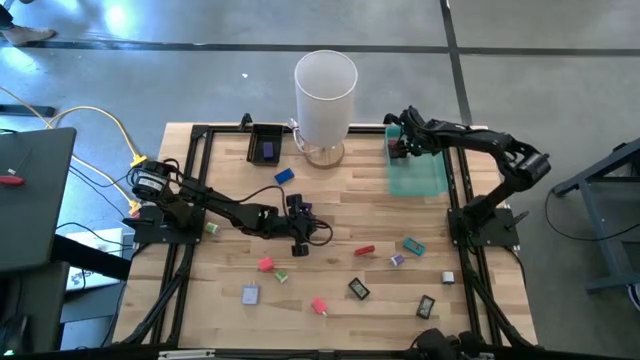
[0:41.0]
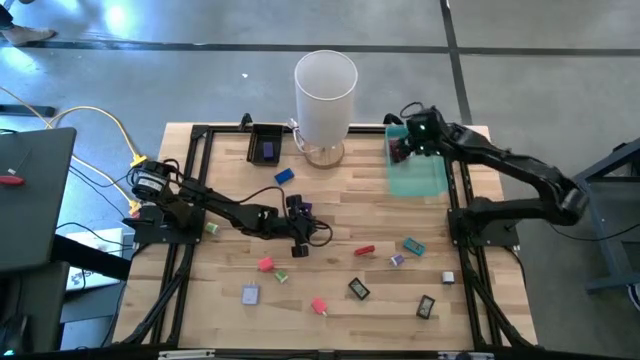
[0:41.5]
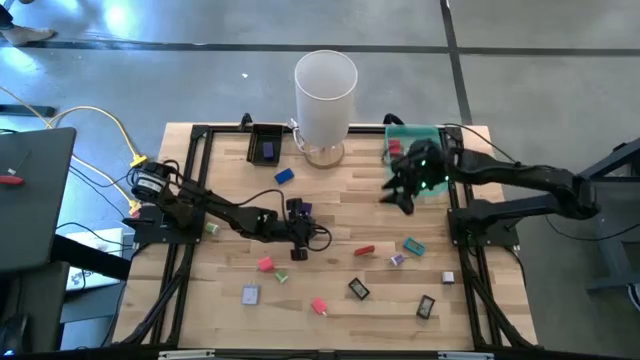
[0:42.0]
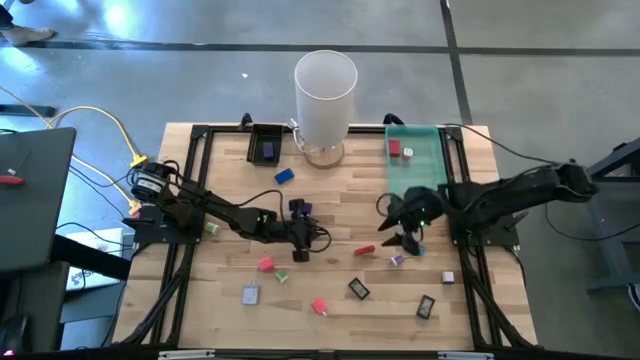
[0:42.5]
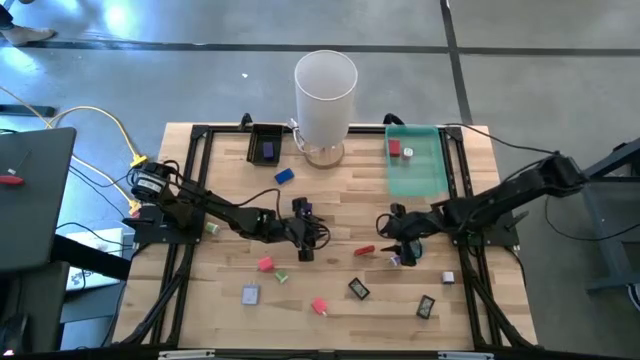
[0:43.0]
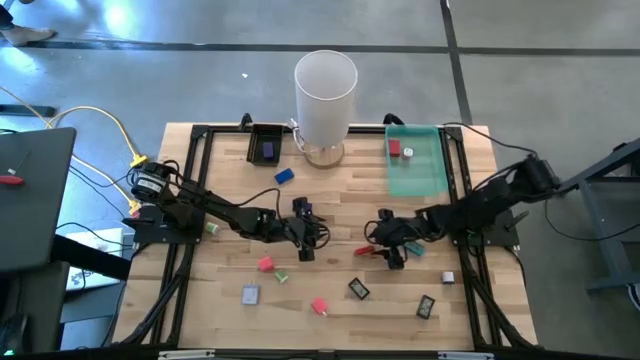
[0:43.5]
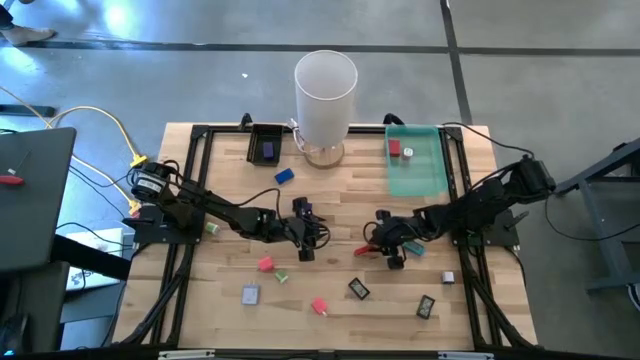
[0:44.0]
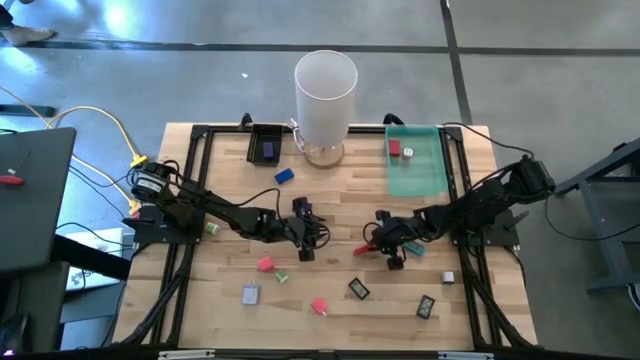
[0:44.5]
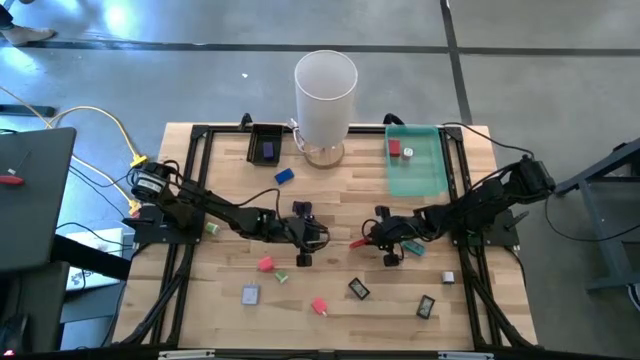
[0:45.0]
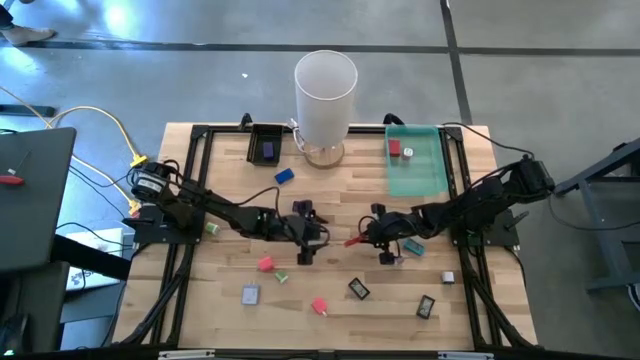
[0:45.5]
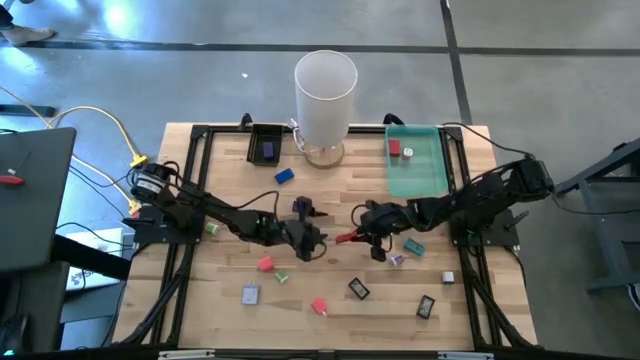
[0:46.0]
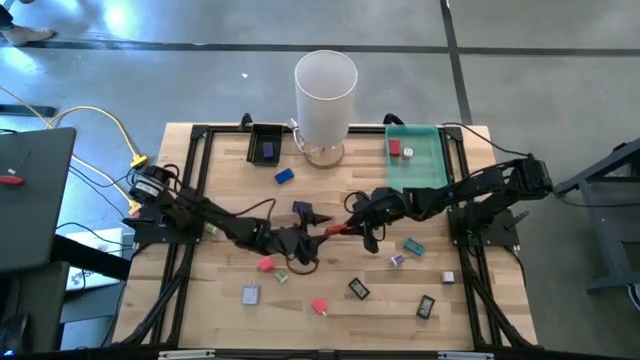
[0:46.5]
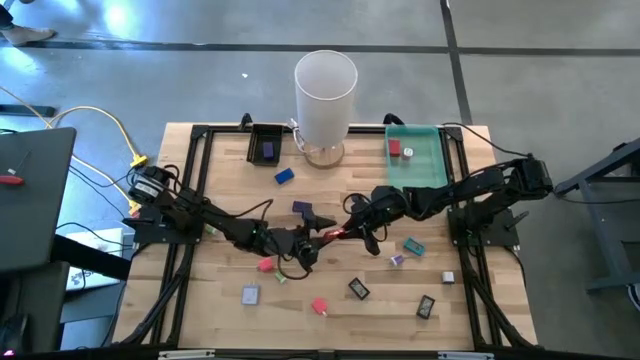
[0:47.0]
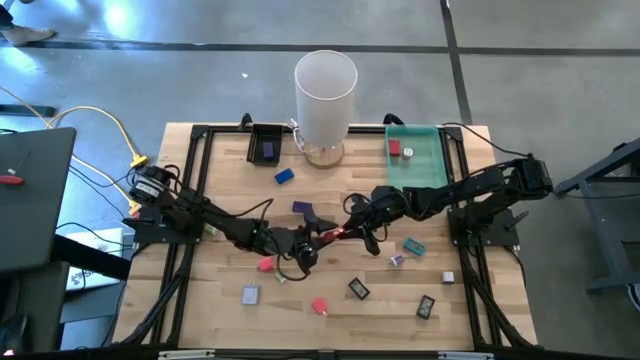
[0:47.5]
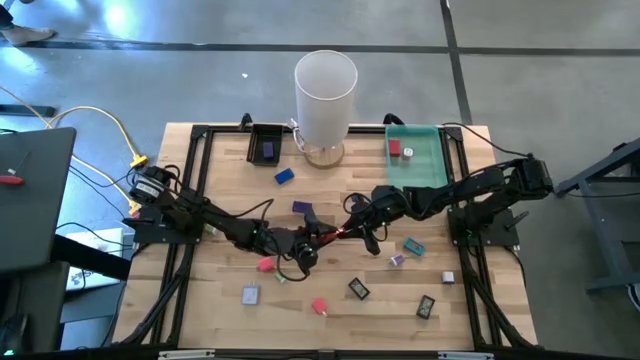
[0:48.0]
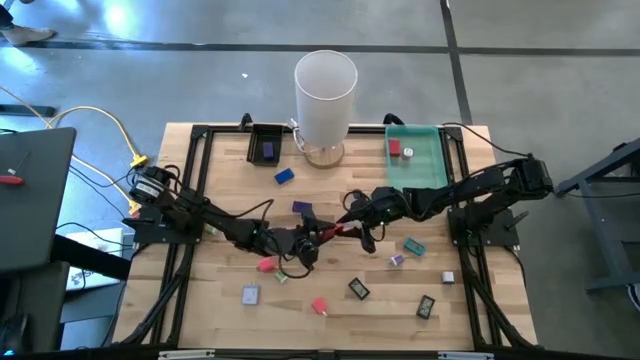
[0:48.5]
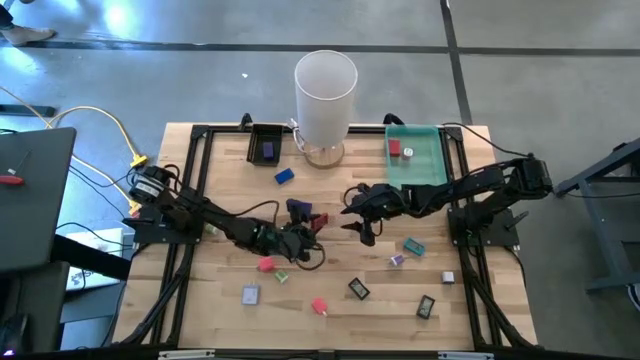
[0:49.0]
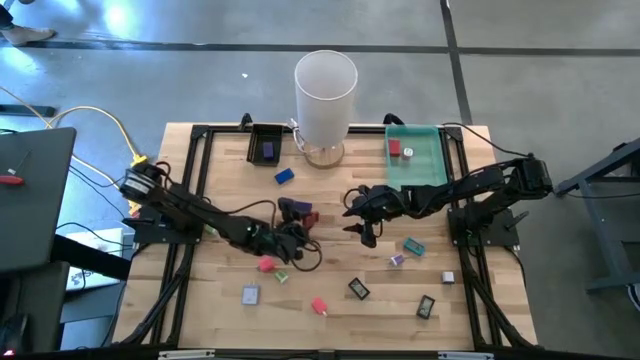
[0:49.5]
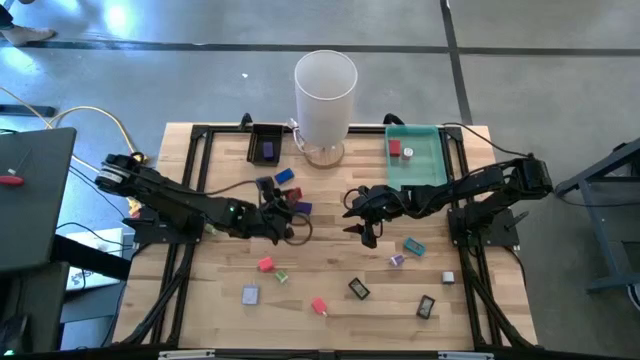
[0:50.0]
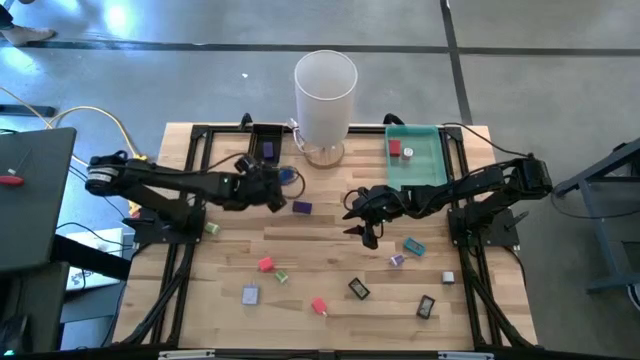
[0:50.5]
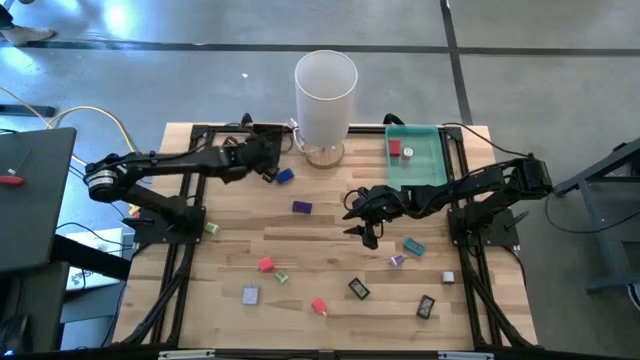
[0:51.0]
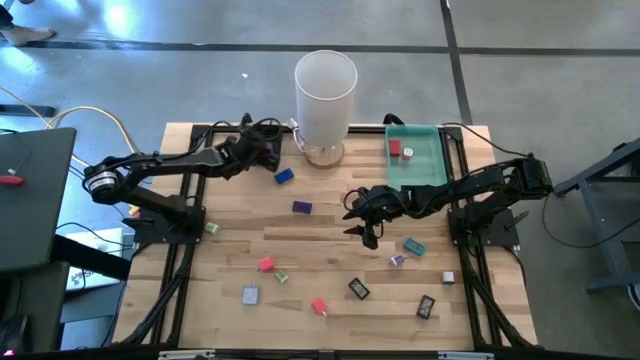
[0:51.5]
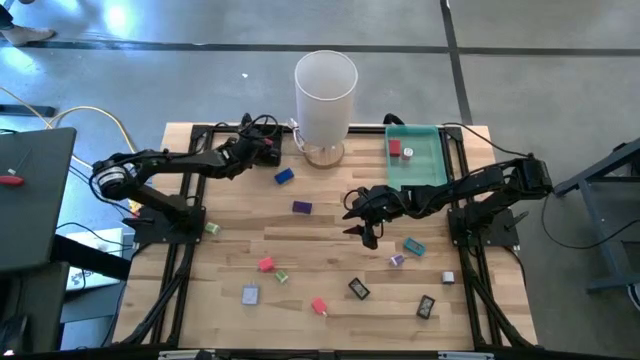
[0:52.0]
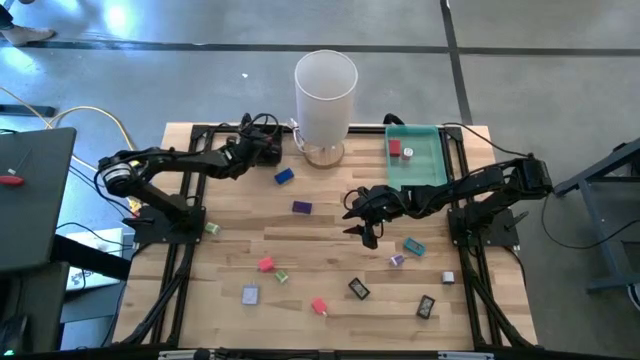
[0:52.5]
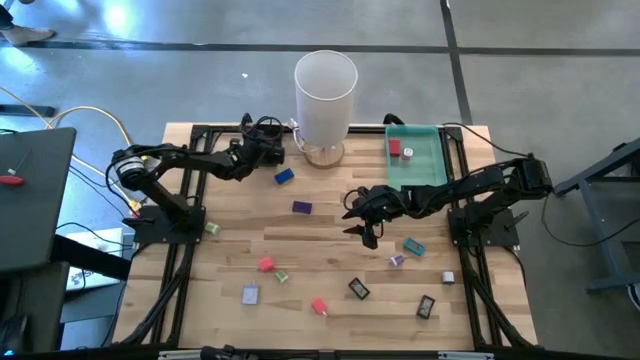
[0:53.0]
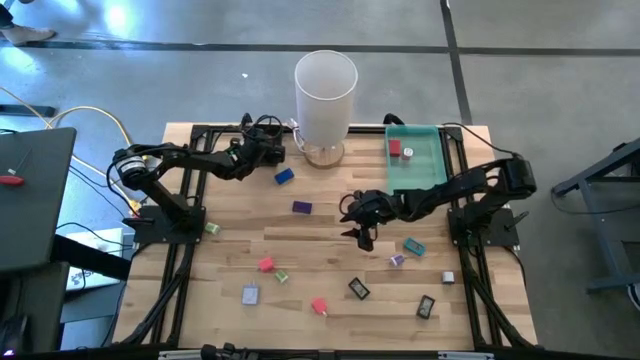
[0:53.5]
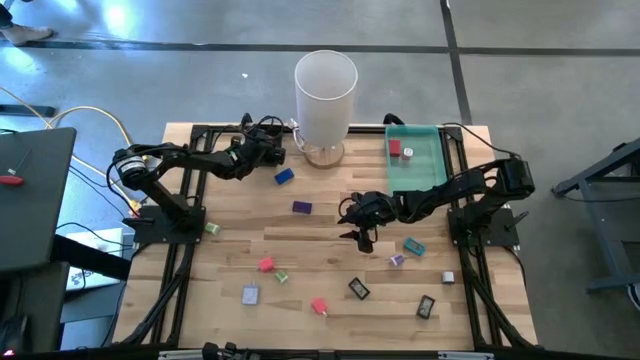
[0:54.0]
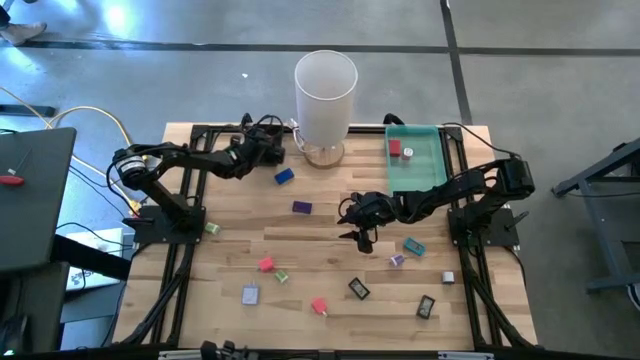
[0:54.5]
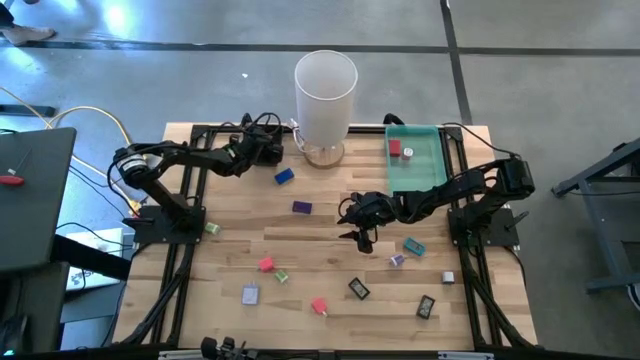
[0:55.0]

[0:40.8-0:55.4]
Task: Pick & Place Office items
Put the red digital clock into the black bin
